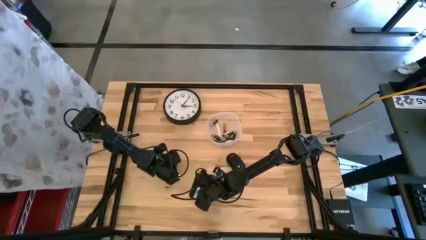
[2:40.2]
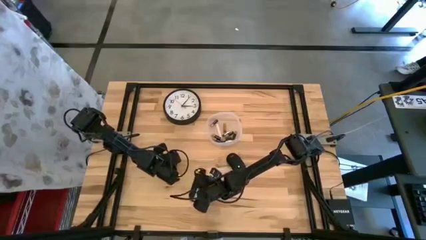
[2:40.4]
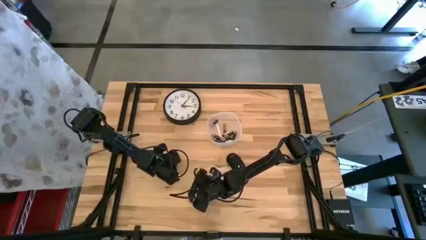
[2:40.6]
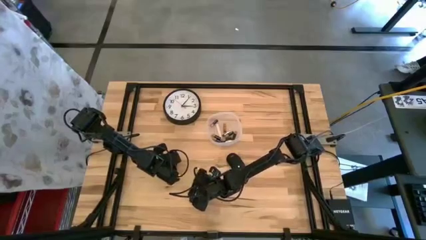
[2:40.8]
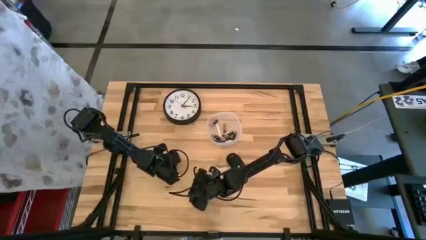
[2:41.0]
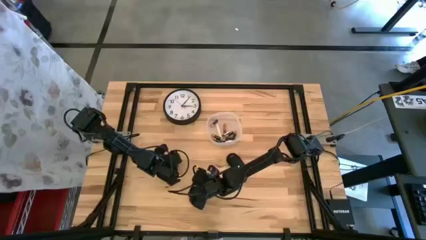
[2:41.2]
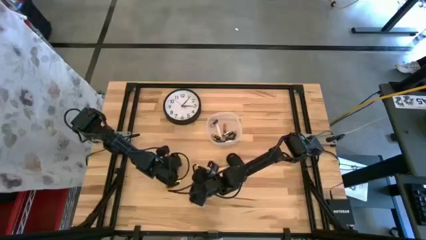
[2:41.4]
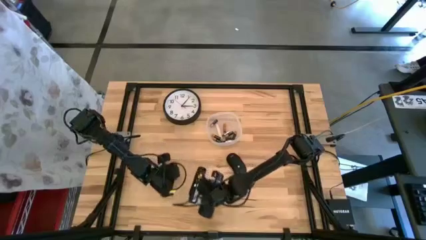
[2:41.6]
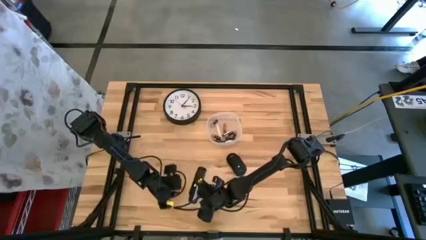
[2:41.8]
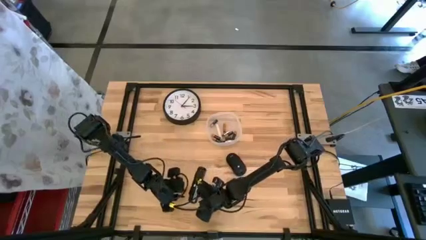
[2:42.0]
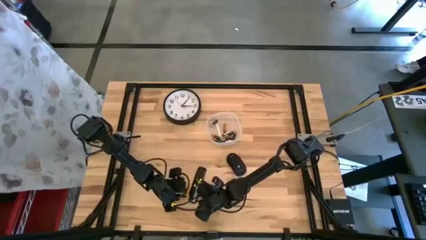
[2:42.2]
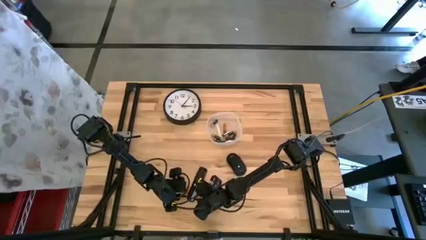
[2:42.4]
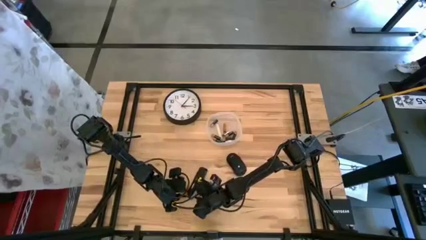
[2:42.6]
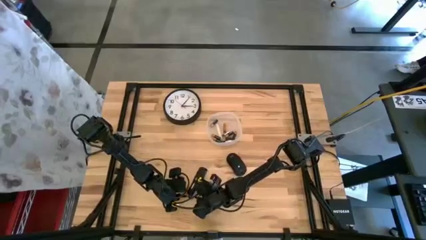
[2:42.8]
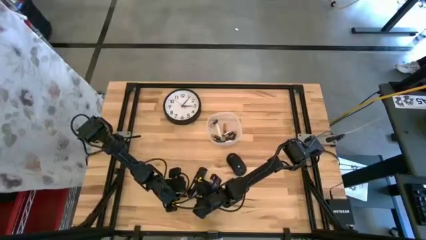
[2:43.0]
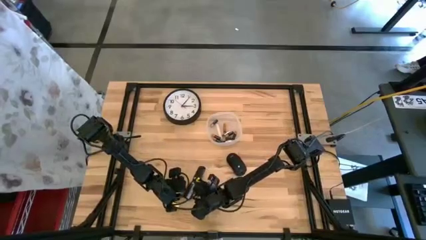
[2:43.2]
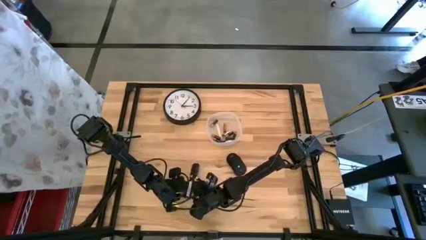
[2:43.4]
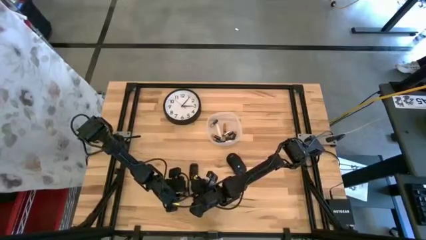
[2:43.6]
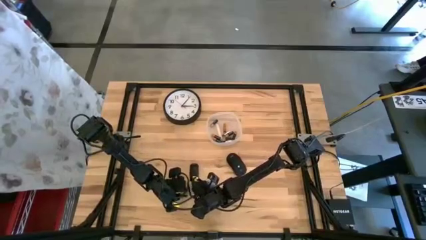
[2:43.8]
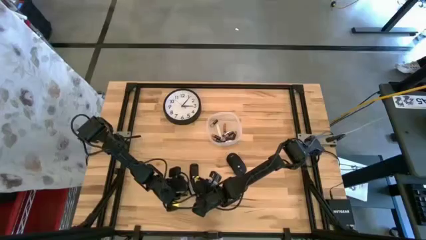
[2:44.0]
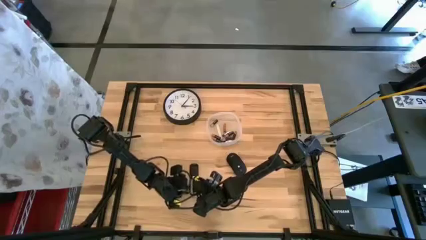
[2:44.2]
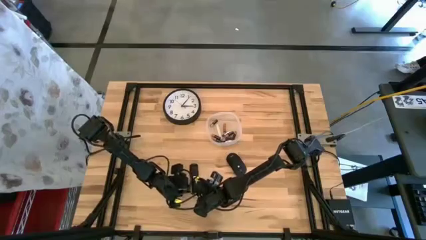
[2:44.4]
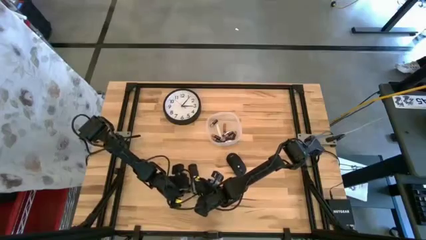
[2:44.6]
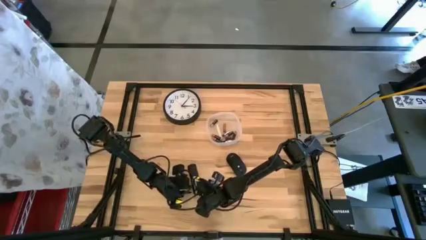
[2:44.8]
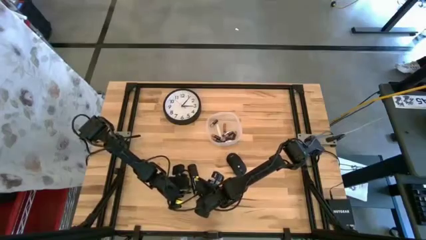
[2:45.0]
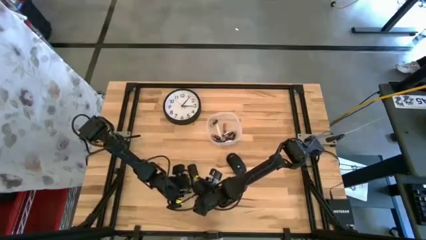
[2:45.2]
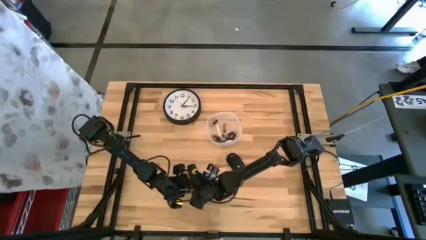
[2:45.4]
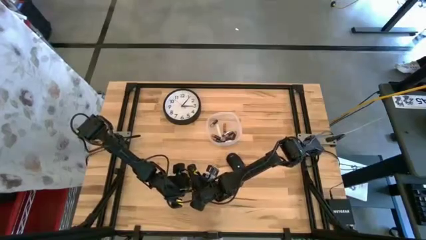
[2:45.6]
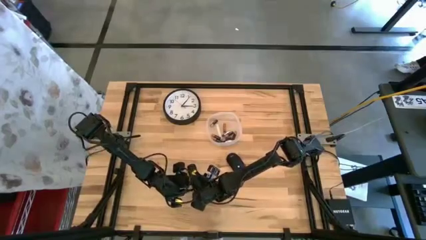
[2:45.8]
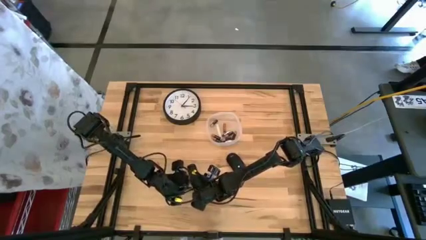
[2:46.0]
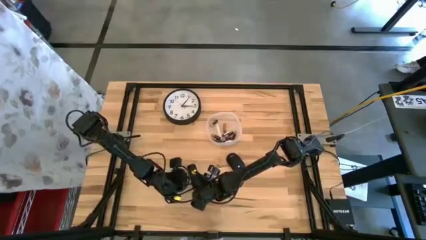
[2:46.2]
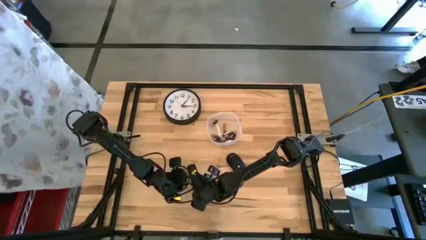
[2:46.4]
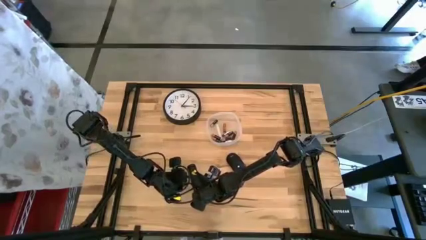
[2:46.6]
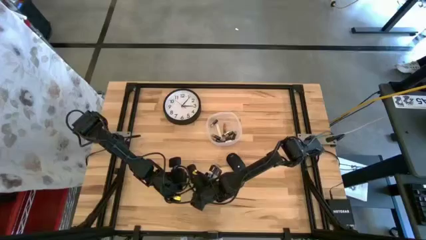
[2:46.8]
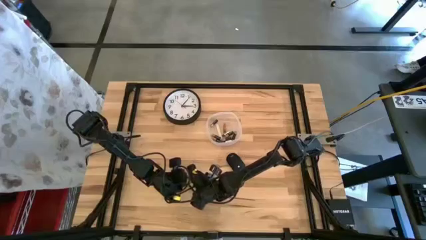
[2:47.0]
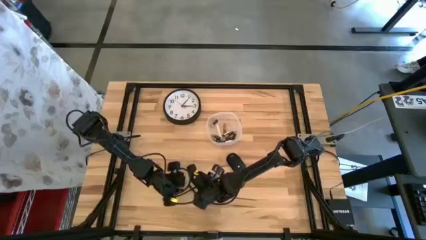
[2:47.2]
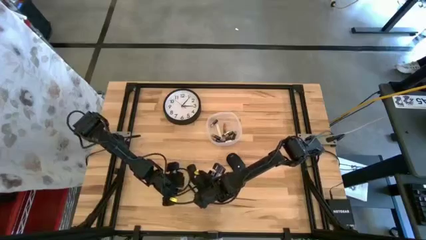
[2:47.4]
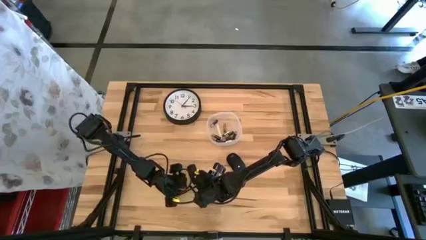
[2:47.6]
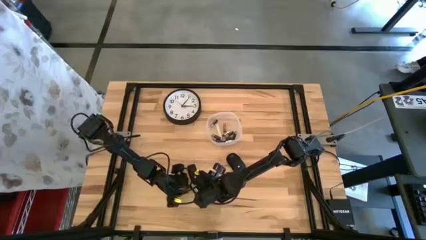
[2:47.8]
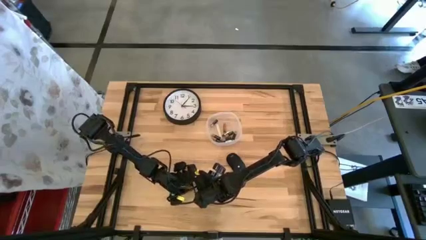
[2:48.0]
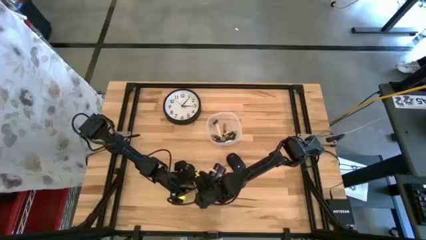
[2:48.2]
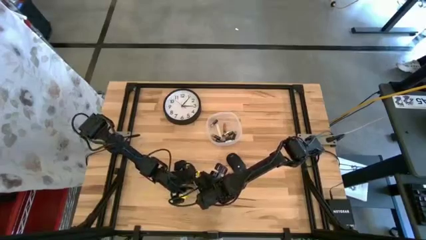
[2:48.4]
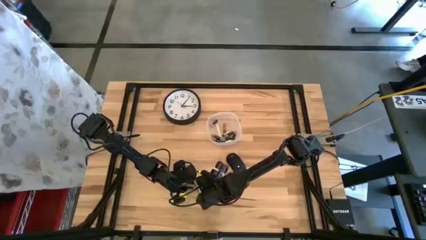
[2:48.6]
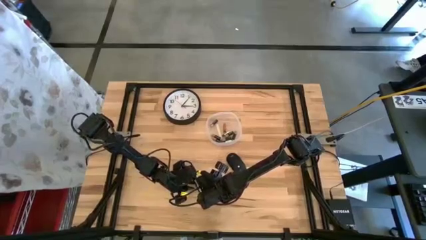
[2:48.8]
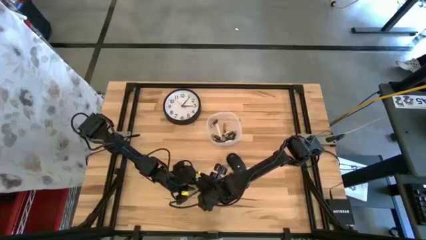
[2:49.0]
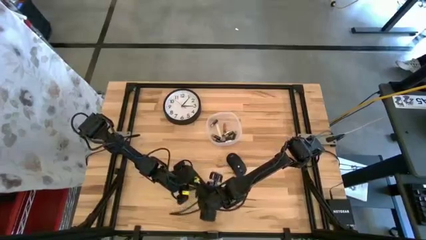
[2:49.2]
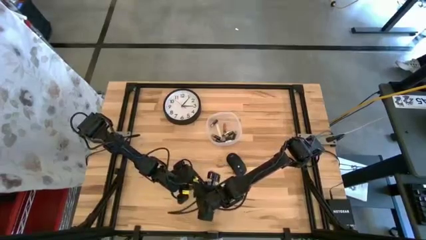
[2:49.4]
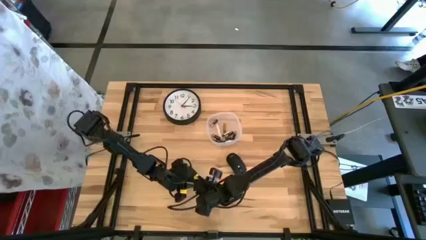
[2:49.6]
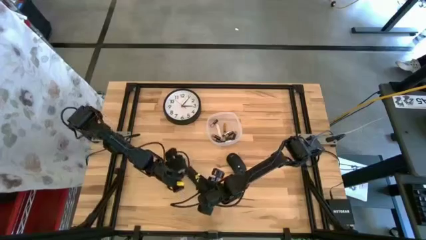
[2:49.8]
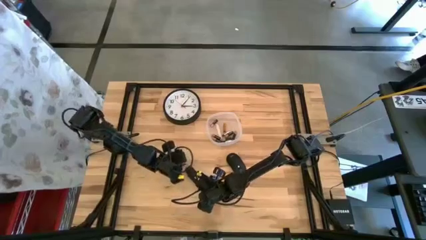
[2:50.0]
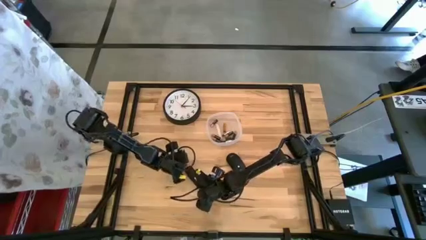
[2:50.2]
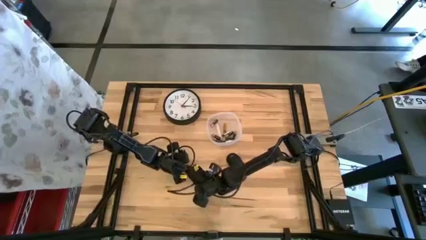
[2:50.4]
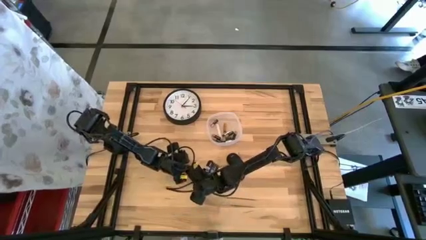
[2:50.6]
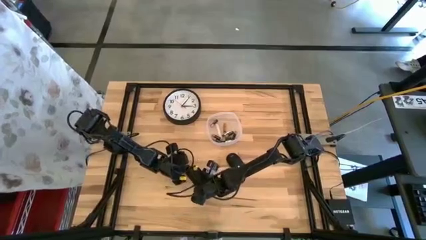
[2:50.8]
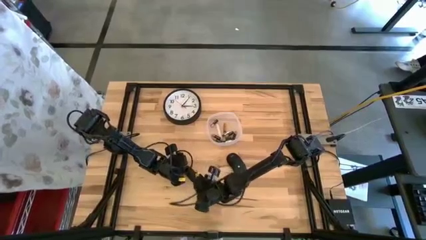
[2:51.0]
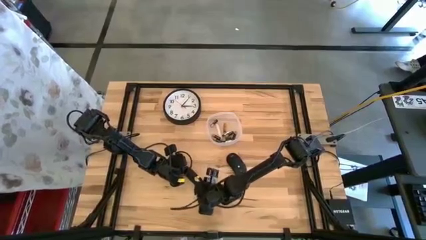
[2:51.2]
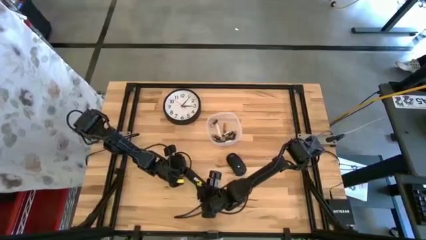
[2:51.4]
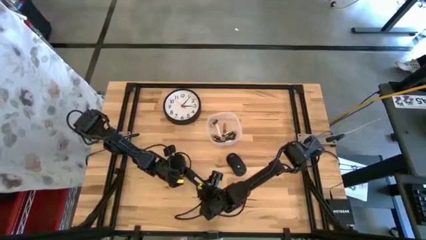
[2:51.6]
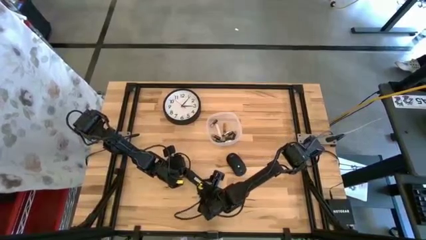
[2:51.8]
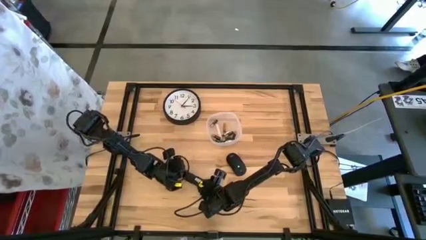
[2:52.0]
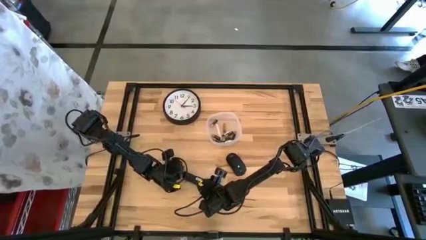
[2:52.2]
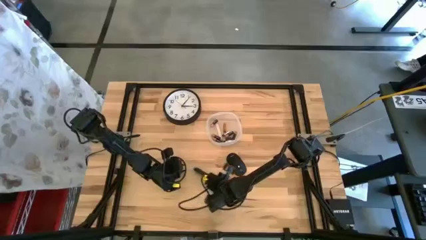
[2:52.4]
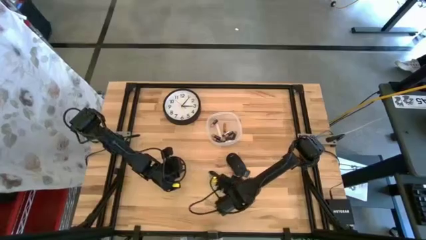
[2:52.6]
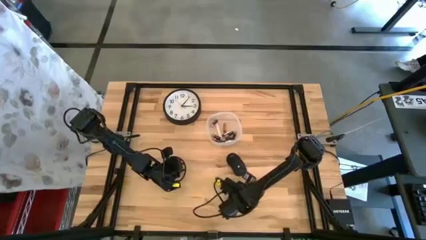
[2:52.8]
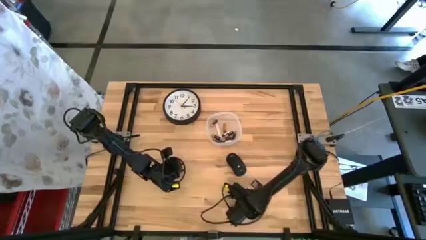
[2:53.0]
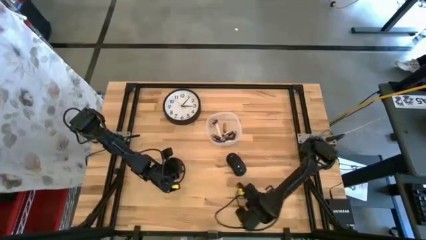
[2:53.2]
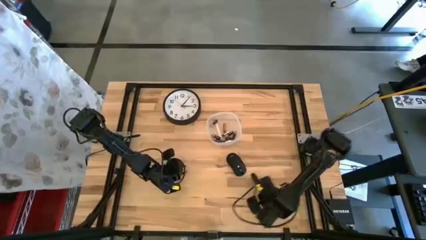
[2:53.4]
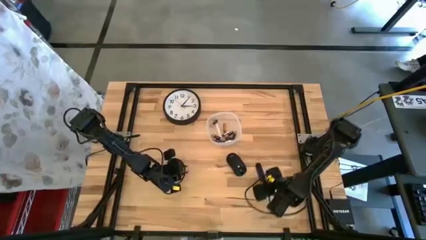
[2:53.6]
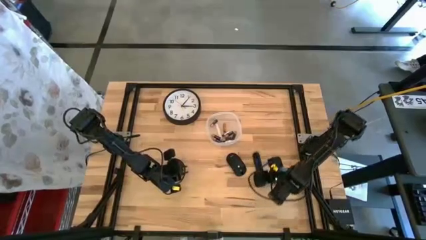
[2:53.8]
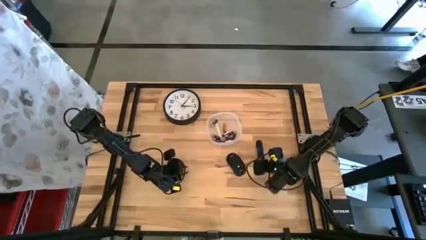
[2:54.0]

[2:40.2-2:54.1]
Task: Insert battery
Close the remote control battery cover
